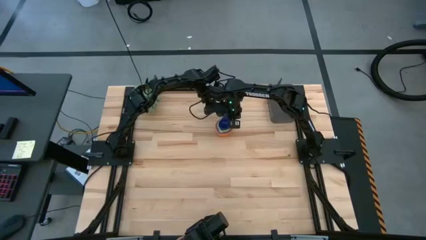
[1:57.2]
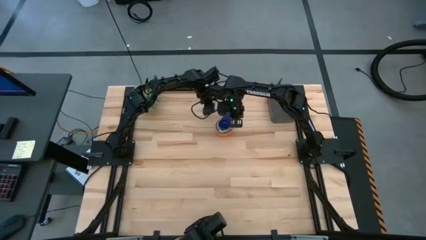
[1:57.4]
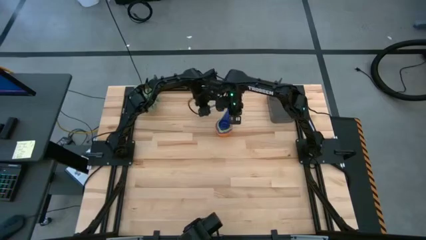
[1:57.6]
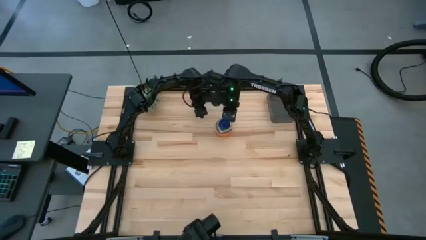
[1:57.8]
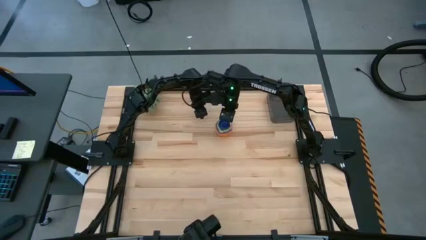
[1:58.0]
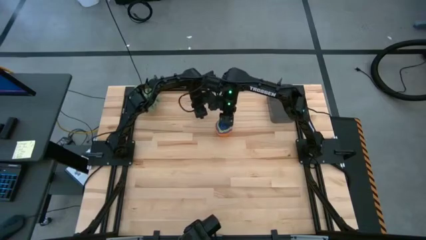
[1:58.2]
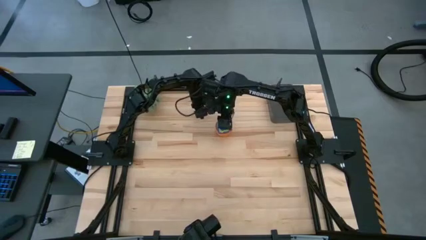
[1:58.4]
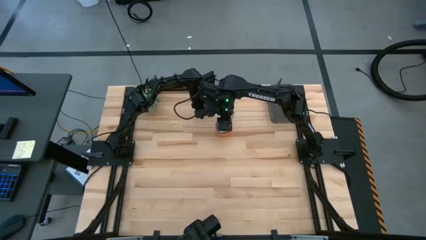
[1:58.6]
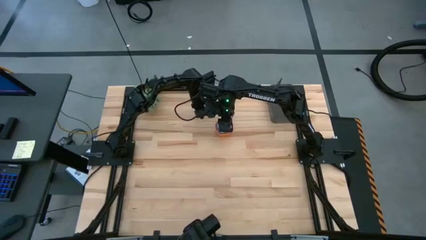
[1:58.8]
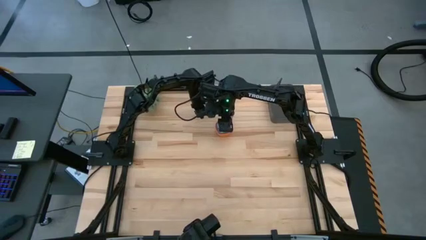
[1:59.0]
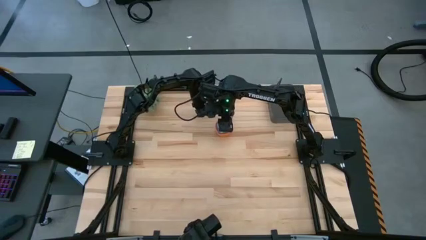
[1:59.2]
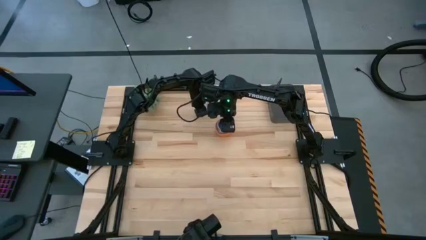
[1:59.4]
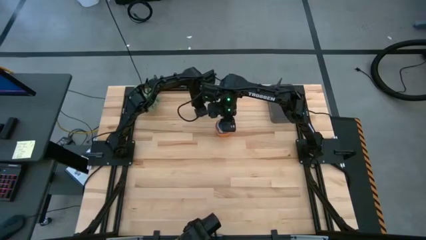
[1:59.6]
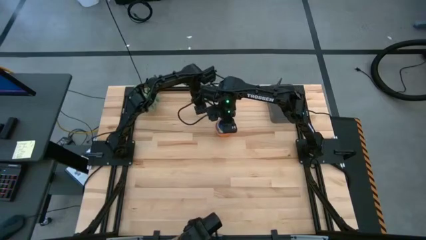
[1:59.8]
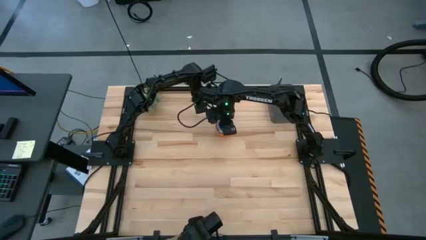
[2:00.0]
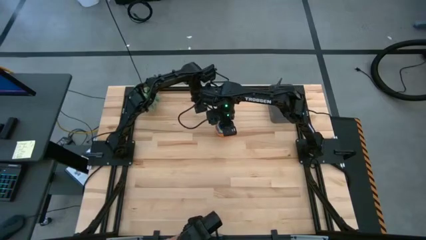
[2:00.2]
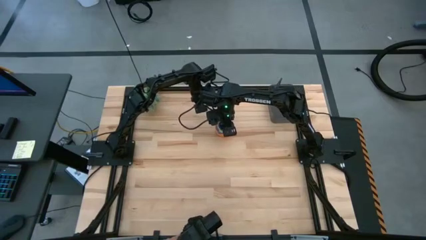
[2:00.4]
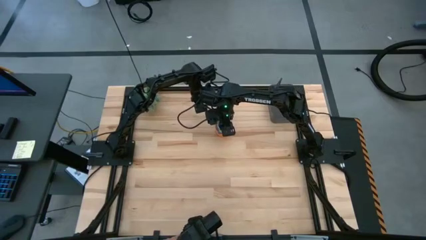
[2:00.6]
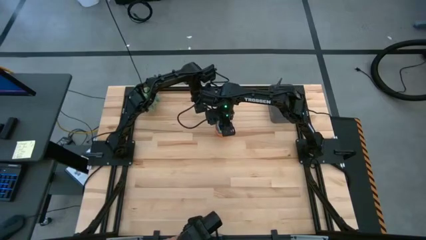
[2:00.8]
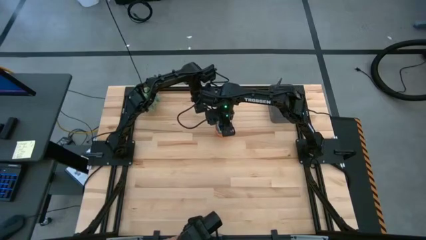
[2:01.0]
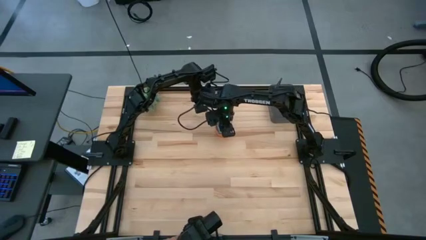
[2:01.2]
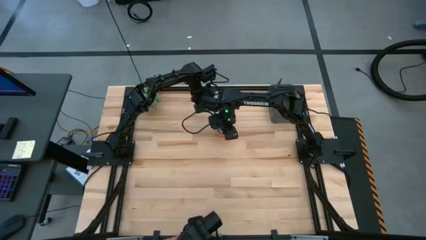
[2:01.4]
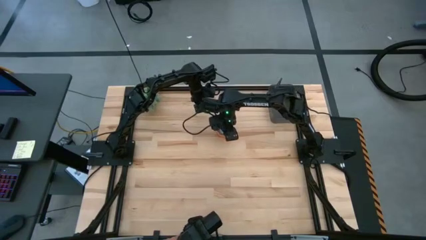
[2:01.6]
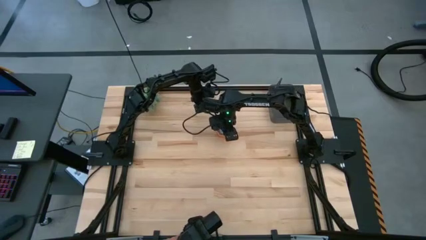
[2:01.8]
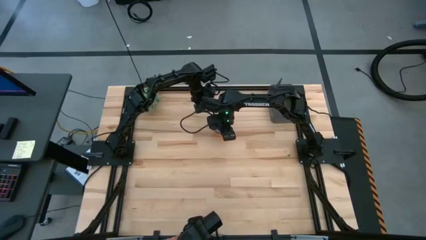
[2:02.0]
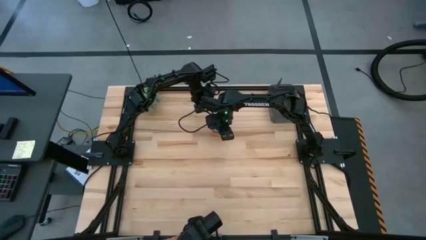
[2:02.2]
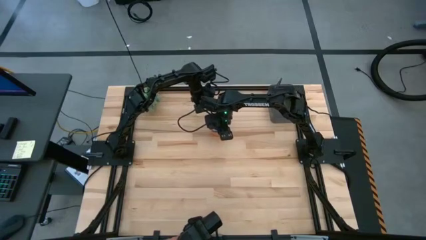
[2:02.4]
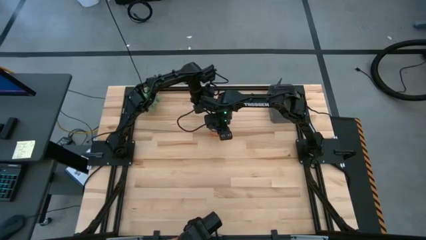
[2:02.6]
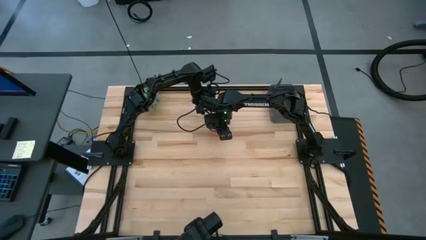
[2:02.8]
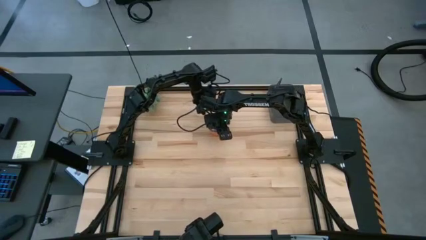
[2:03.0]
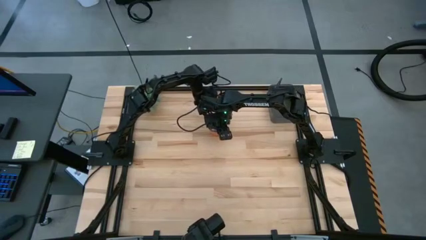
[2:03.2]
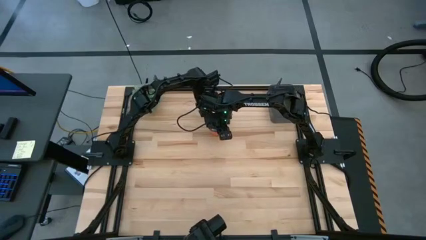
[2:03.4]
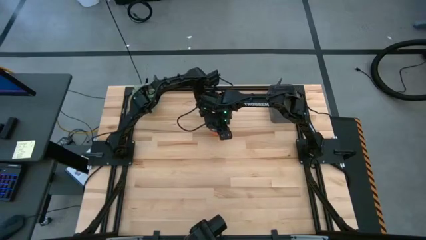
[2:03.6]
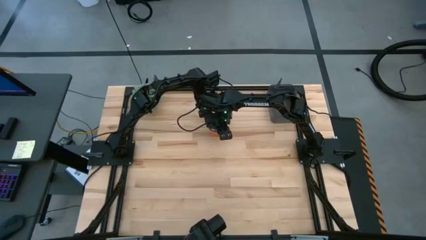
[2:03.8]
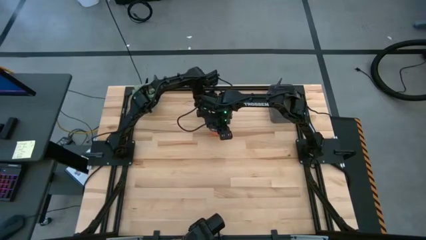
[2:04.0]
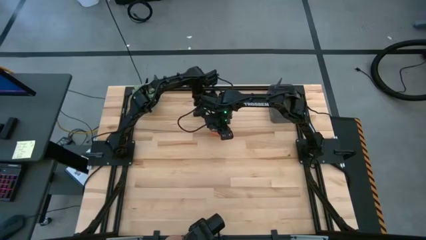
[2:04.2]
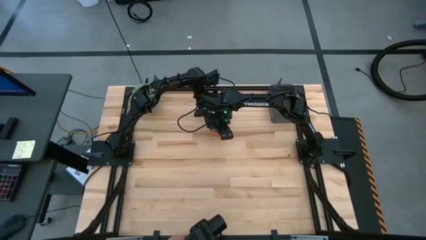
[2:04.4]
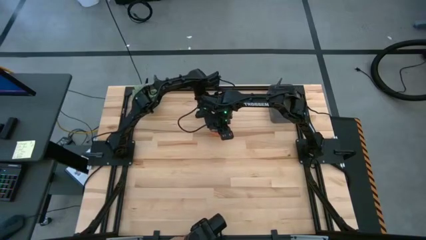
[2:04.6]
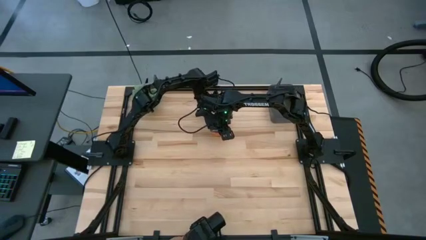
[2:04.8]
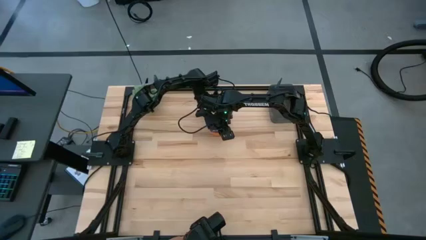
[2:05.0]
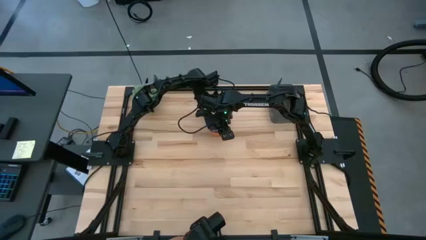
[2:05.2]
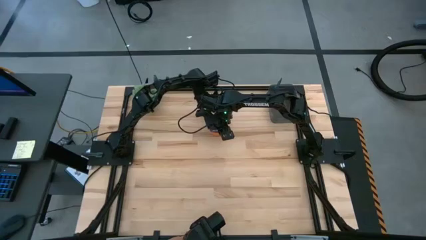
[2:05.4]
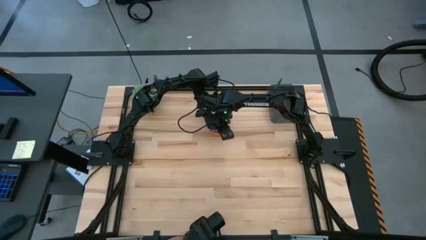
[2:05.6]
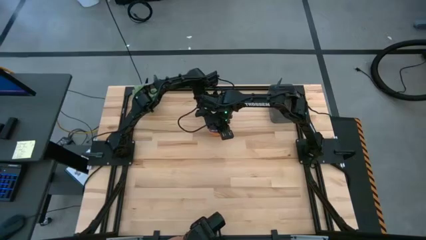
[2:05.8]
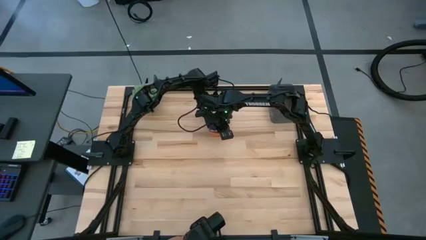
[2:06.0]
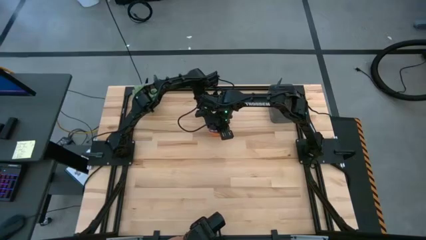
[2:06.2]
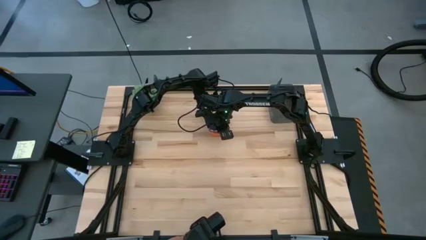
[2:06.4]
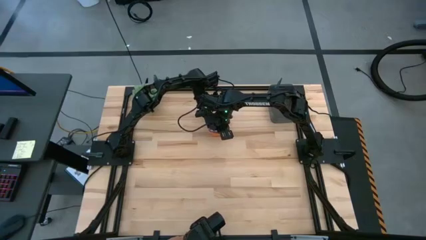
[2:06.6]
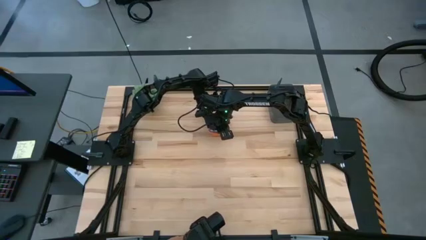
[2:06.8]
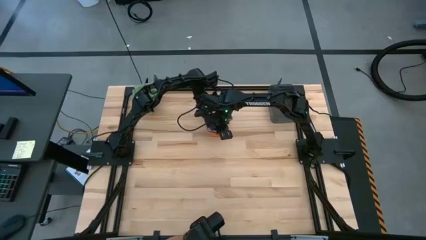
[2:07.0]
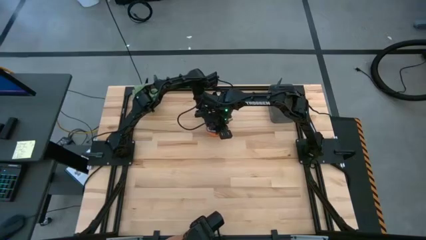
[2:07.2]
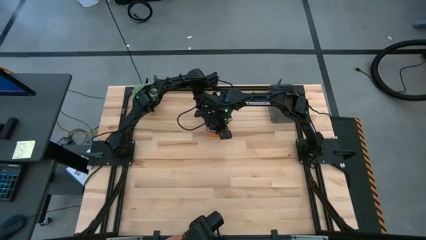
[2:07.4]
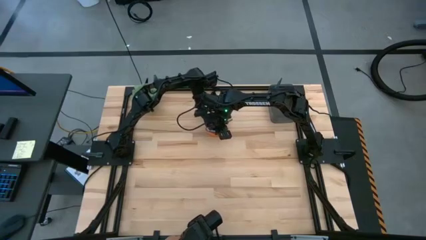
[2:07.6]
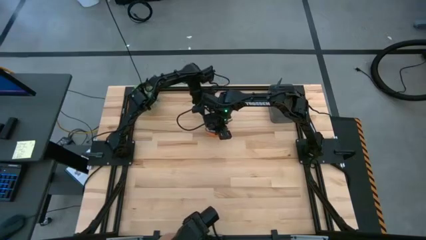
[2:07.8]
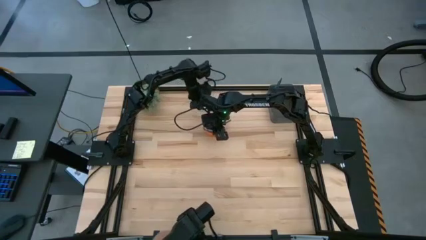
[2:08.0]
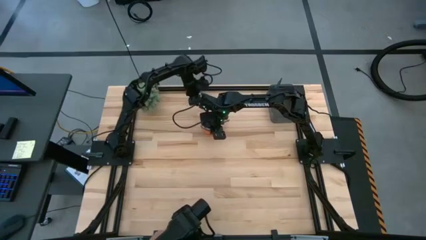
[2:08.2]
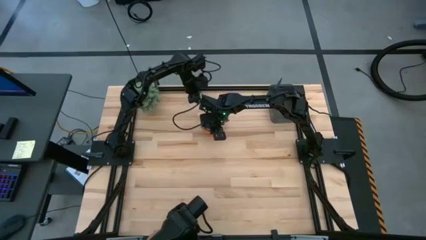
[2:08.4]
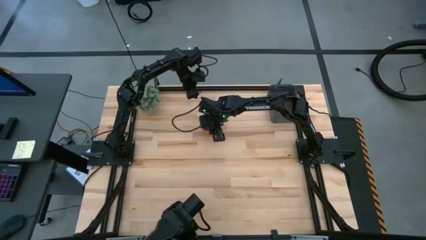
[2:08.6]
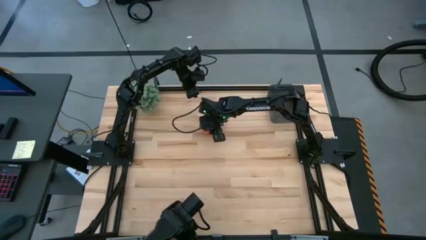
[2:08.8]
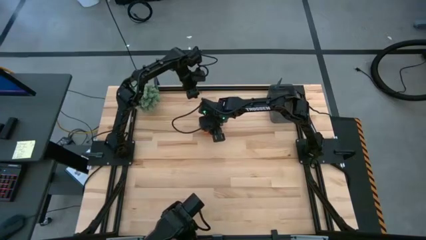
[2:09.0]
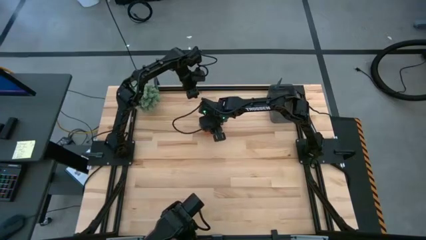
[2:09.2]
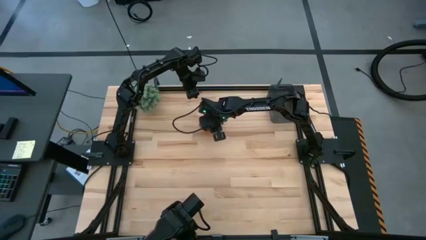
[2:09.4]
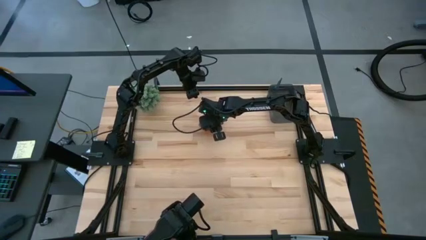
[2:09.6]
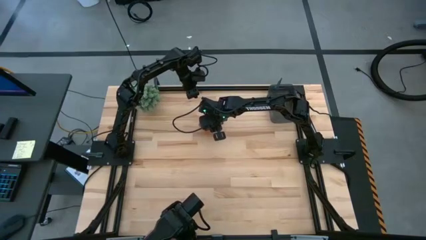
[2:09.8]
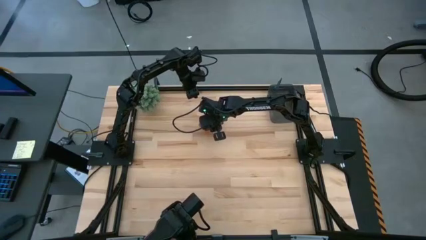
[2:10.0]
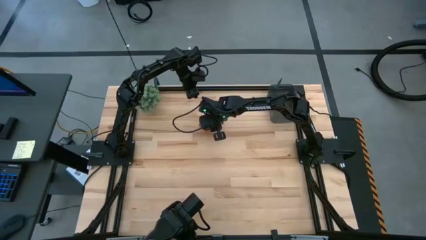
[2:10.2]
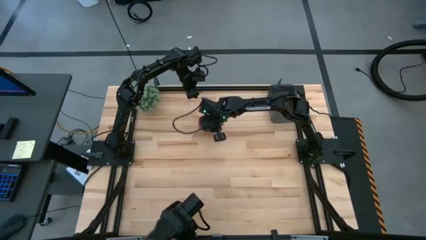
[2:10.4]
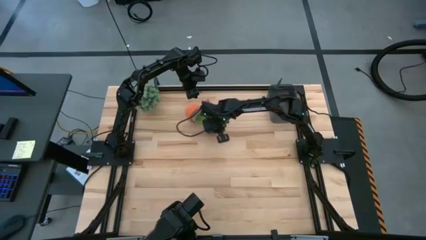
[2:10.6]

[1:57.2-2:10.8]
Task: Nest measuring cups in basket
Put the nested measuring cups into the black bin

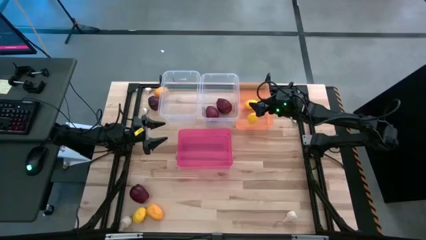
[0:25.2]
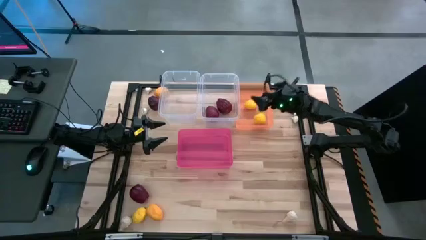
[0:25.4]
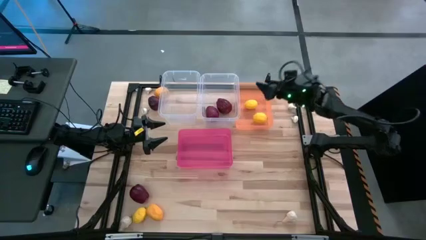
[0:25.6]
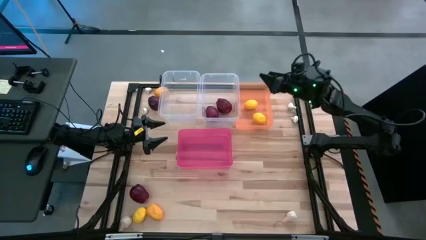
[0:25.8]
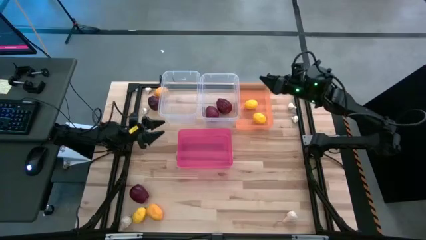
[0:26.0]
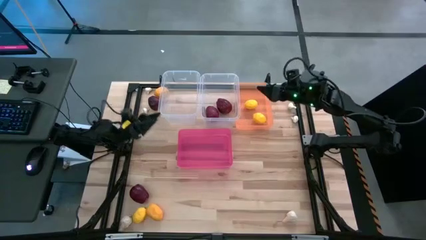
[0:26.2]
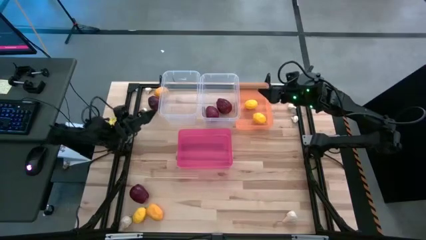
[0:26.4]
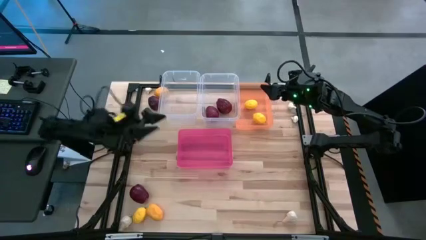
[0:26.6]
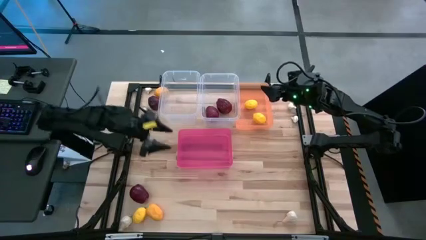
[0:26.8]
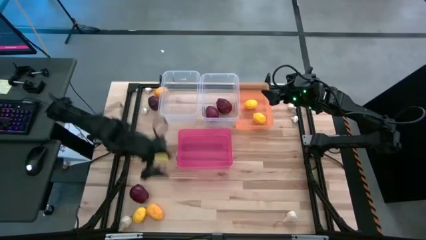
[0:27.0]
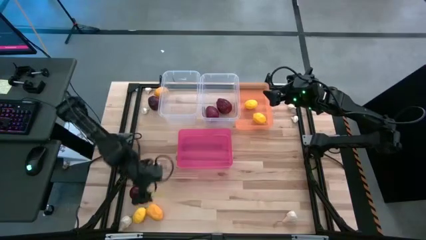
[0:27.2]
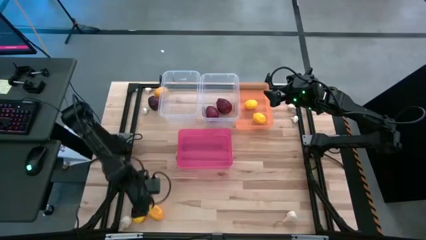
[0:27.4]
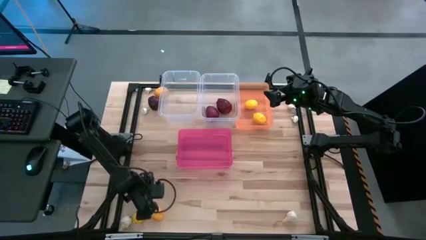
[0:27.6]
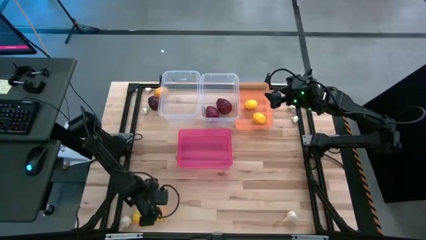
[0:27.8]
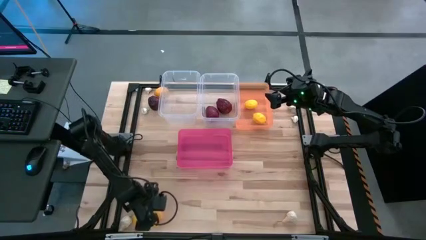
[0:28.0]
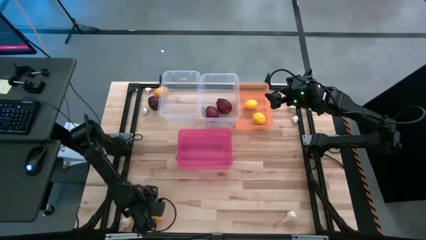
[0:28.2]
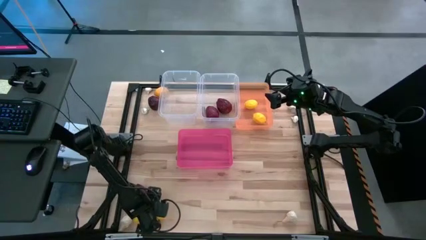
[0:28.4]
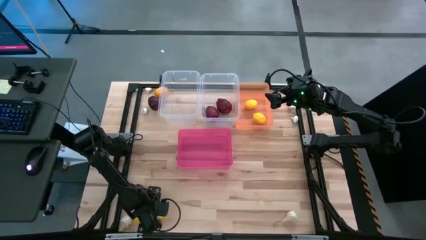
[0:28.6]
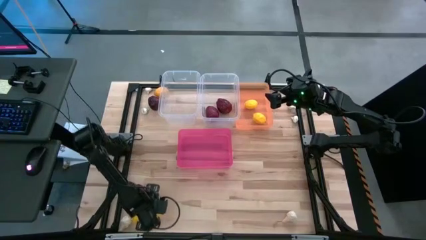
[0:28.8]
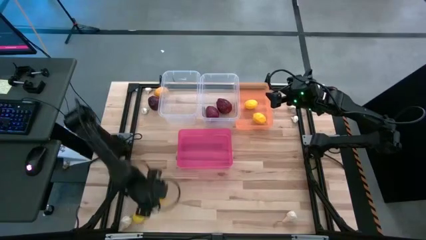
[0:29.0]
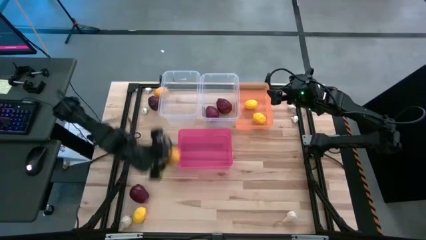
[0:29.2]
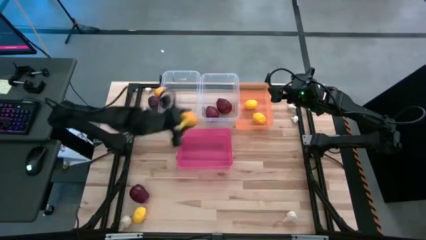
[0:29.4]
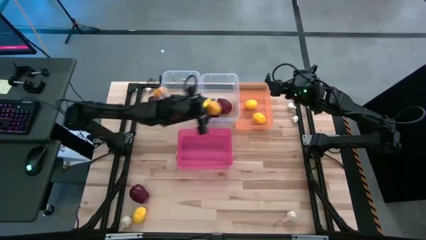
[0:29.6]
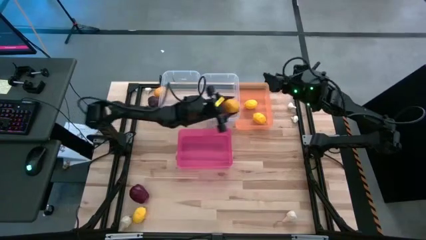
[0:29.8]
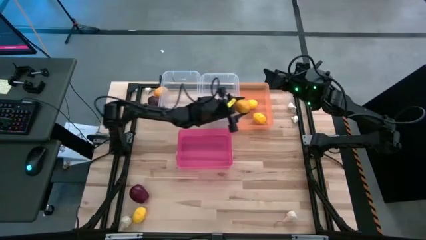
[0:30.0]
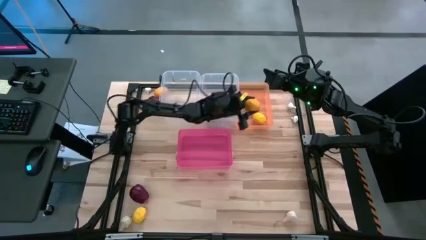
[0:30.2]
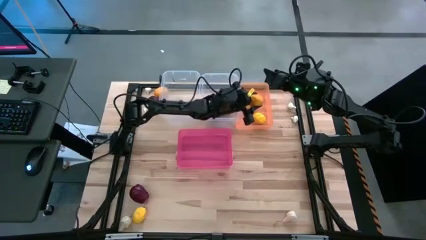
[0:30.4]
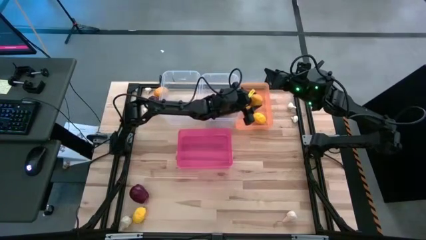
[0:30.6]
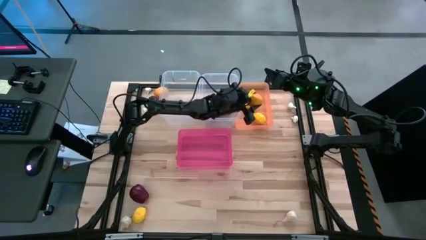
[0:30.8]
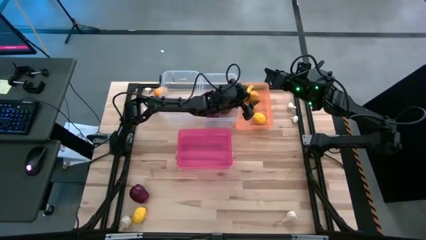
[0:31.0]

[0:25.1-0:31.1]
Task: Sort produce into baskets
Put the yellow lemon into the orange bin
